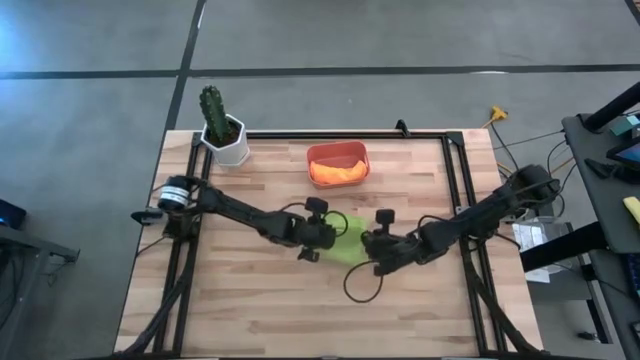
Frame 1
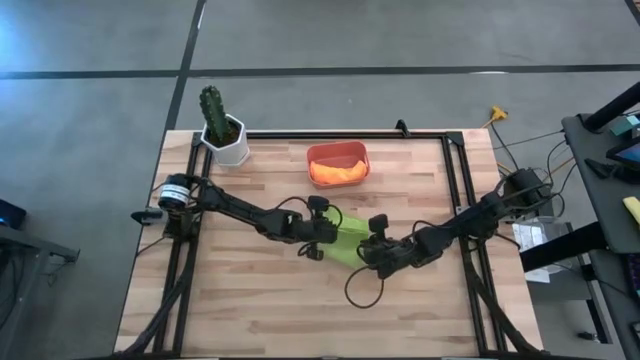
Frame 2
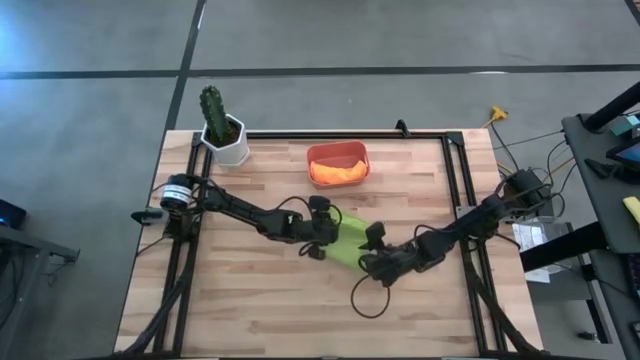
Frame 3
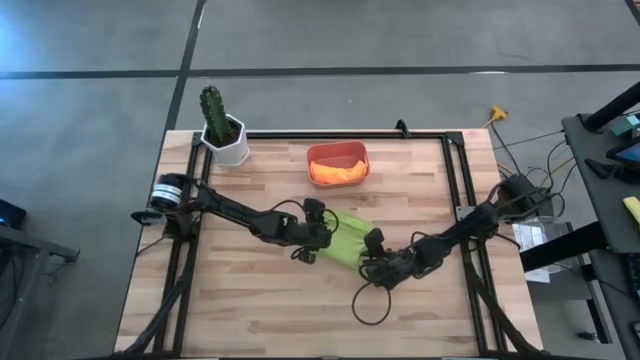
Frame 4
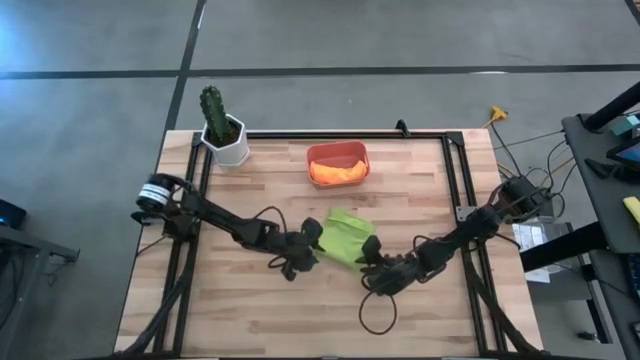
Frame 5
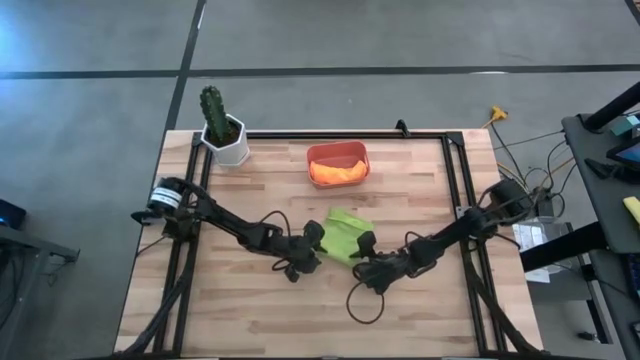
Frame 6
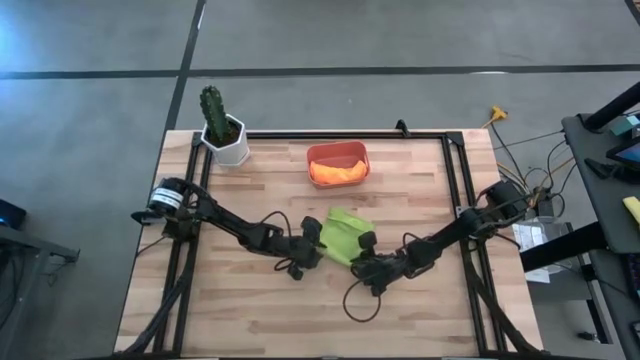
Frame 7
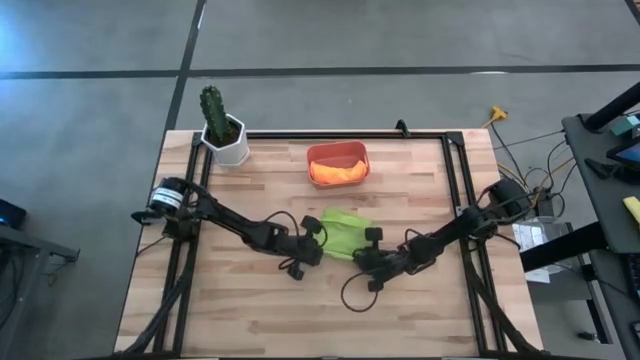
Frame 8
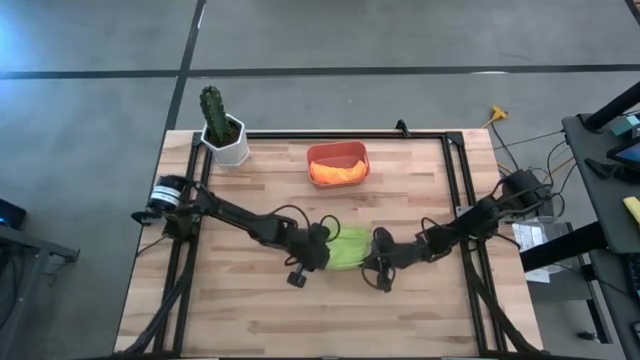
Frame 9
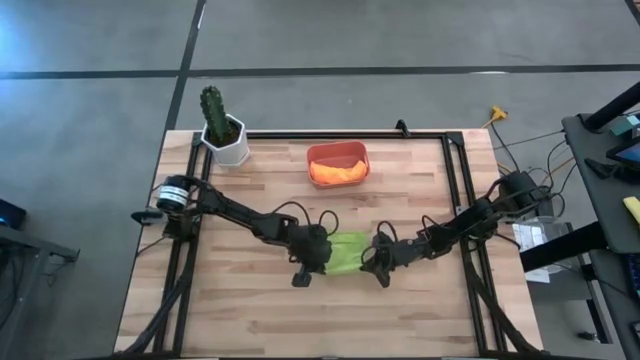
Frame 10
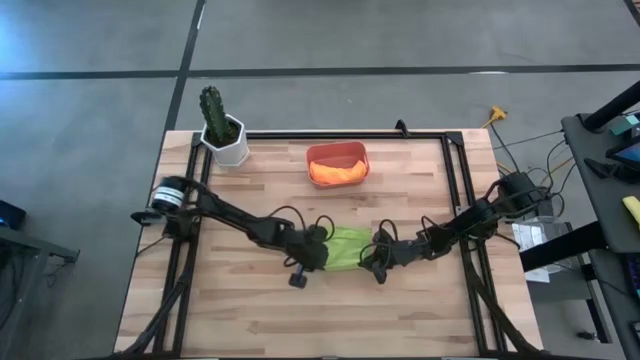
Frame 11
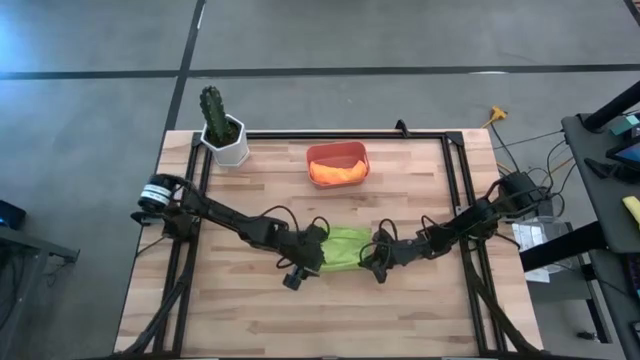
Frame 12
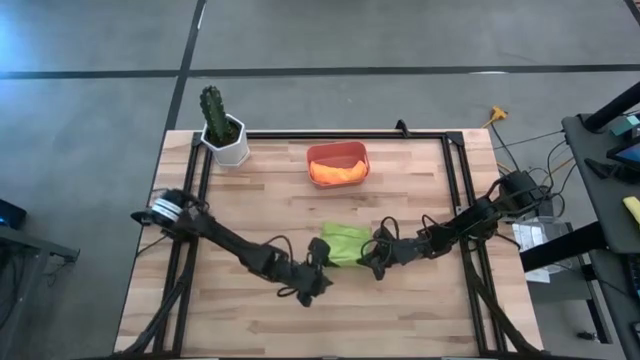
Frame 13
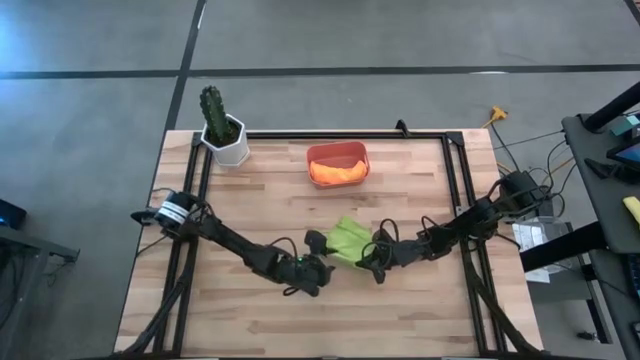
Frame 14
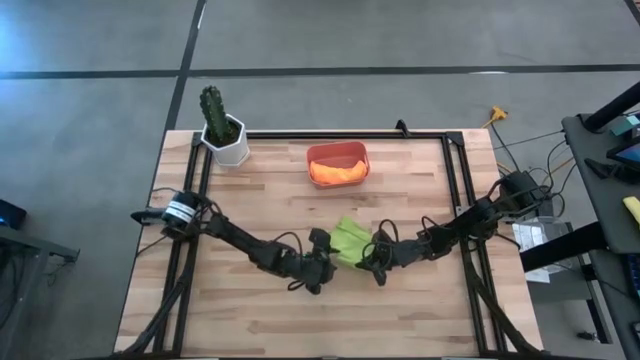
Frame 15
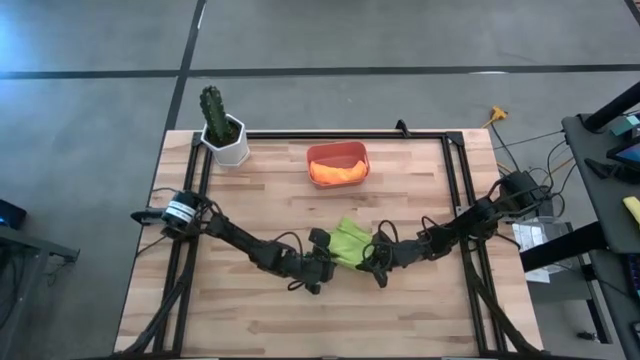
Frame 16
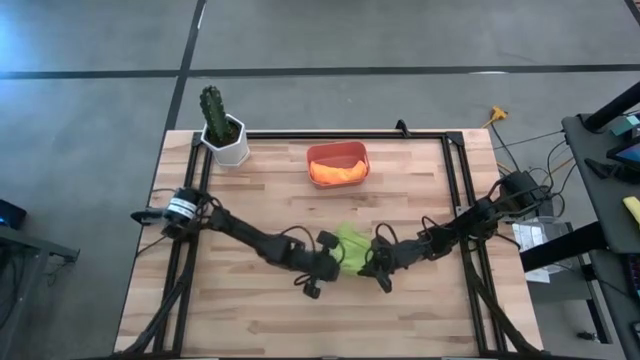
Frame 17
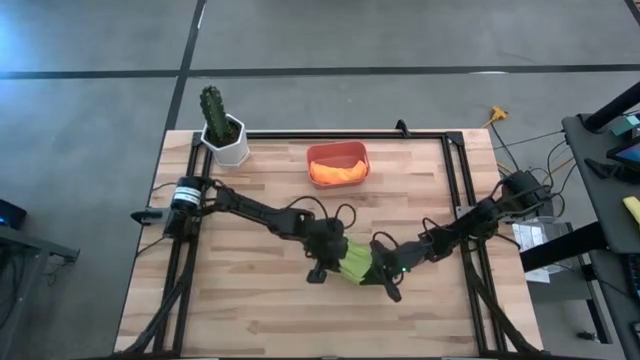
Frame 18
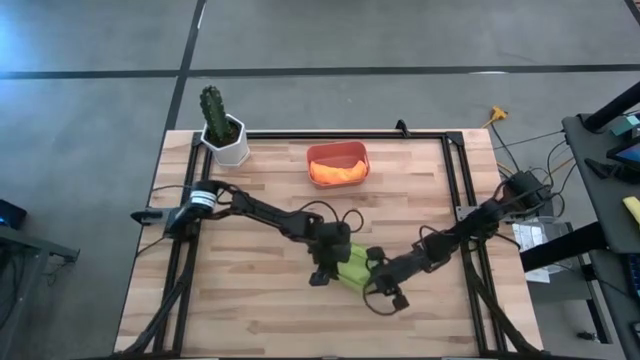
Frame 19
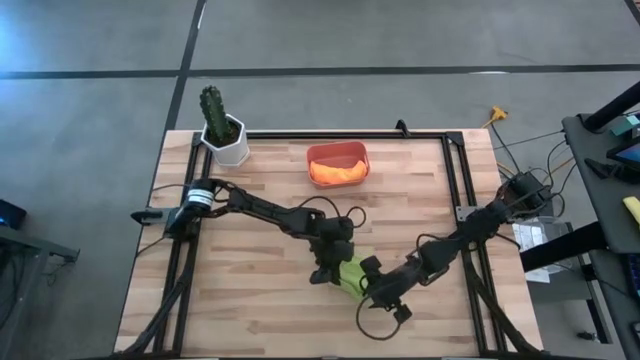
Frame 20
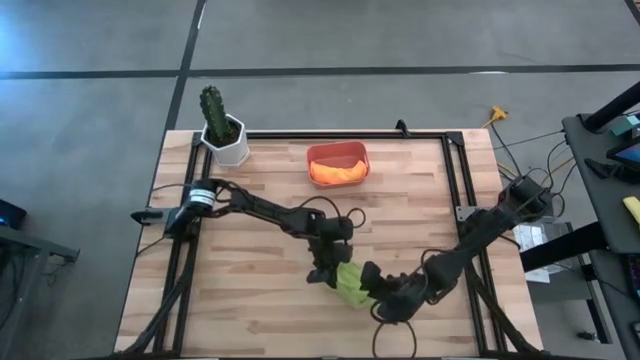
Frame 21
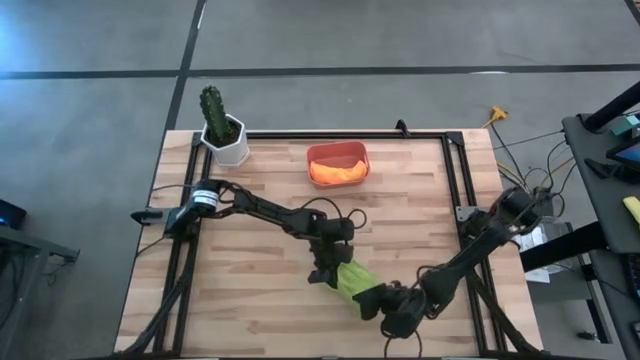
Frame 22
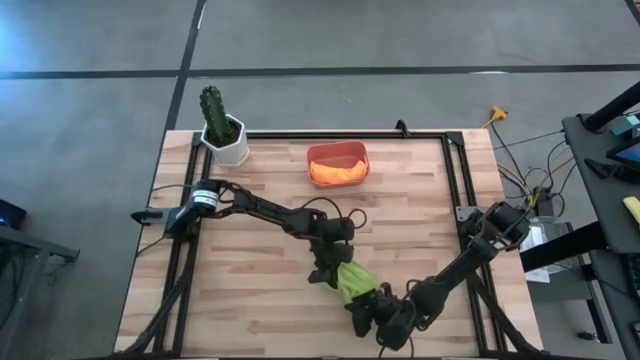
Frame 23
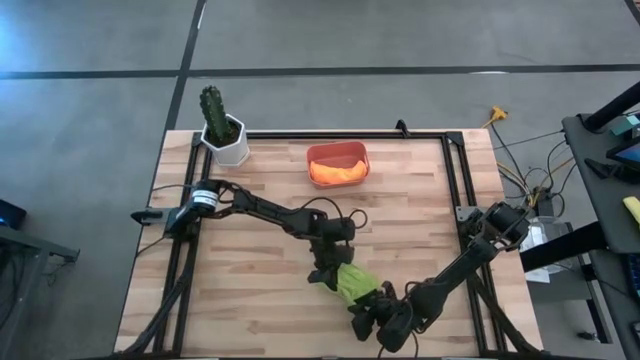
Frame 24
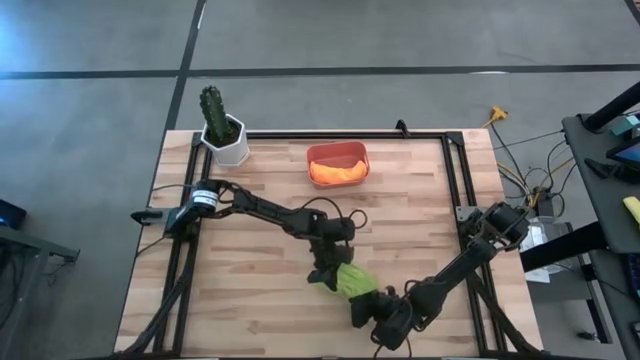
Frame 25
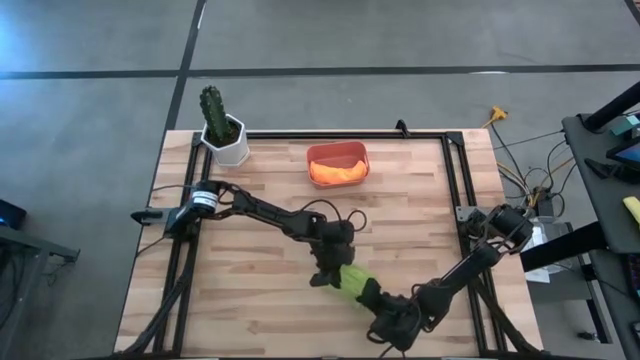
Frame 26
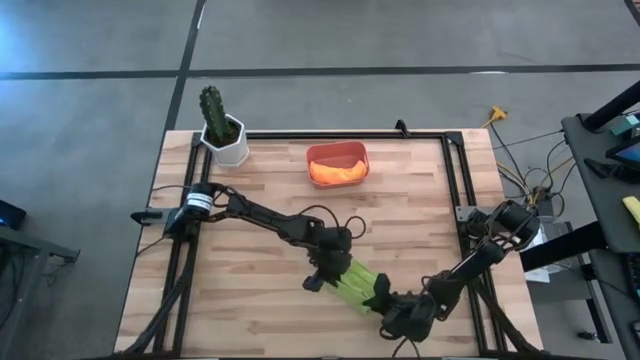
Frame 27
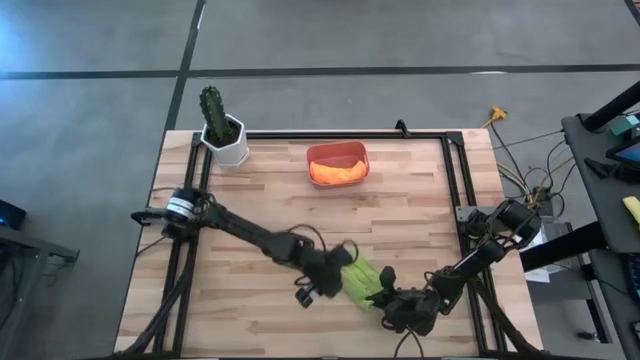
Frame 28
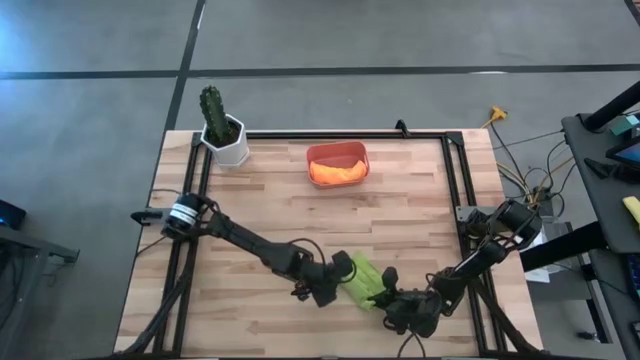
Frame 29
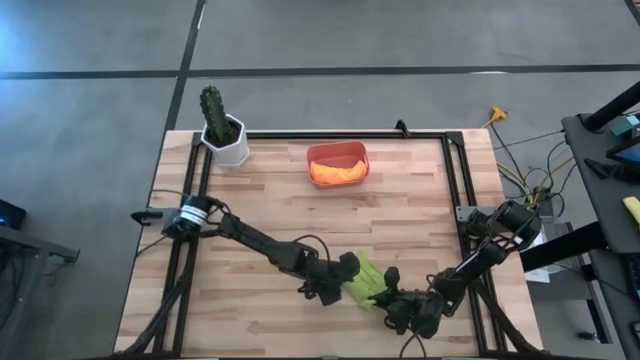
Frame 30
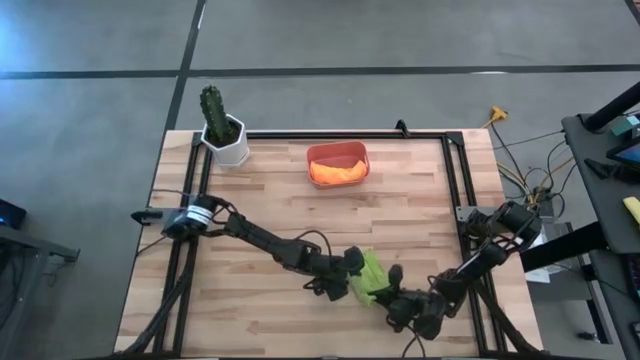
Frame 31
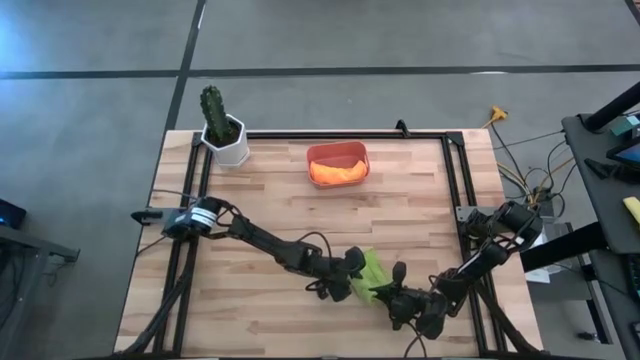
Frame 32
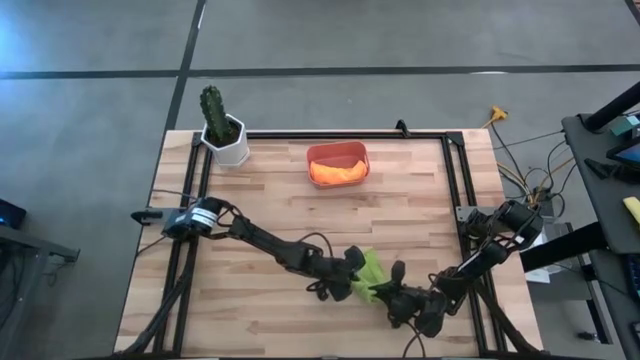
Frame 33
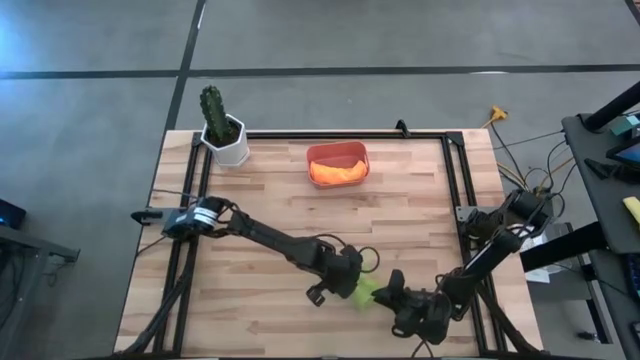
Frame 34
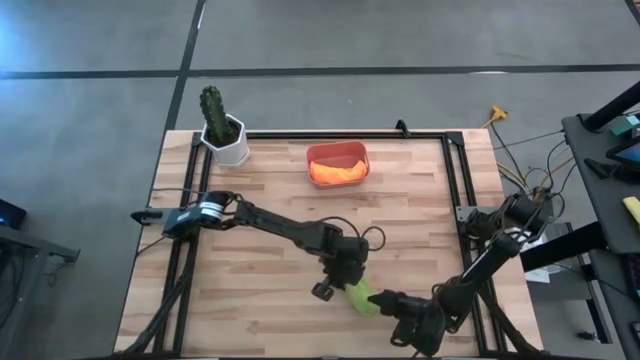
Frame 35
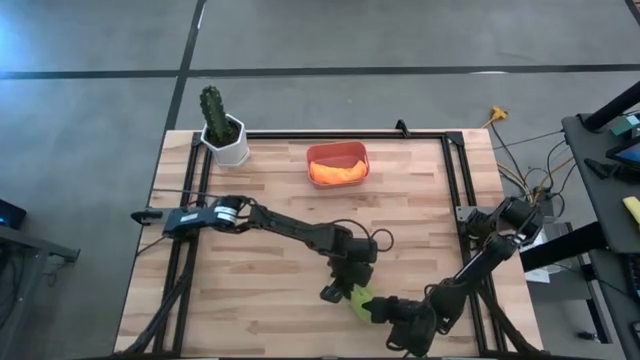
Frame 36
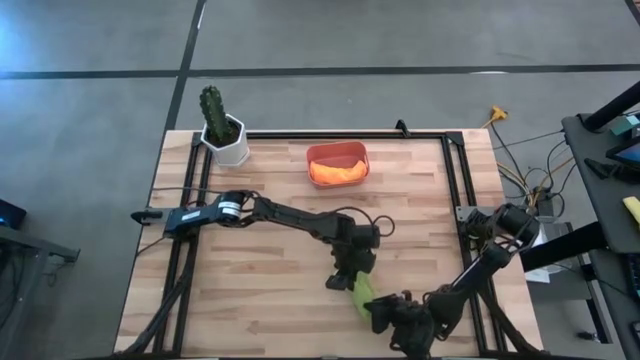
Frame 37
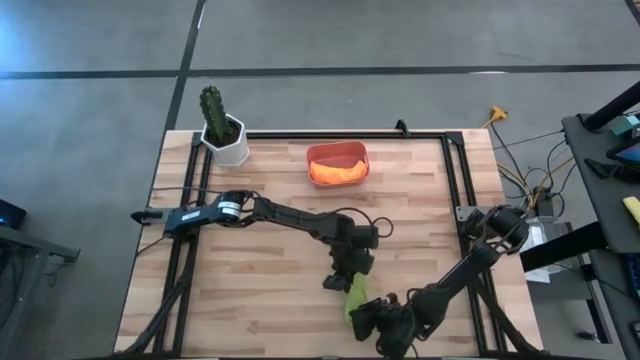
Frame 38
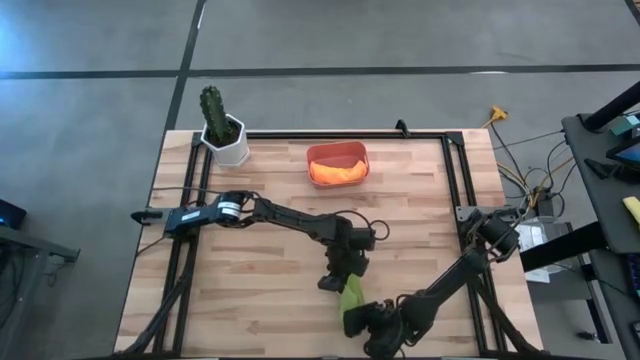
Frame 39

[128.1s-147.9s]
Task: Roll microfiber towels into tight, uniform cylinder then place into a basket
Roll the green microfiber cloth

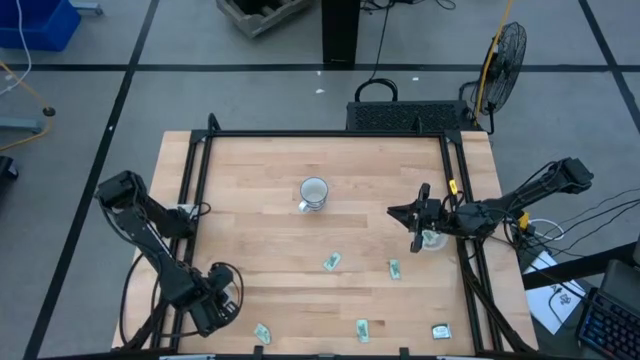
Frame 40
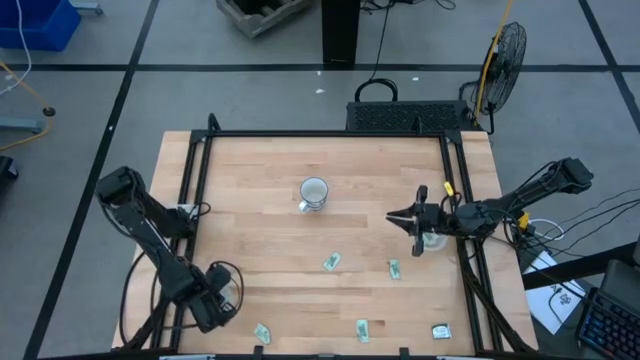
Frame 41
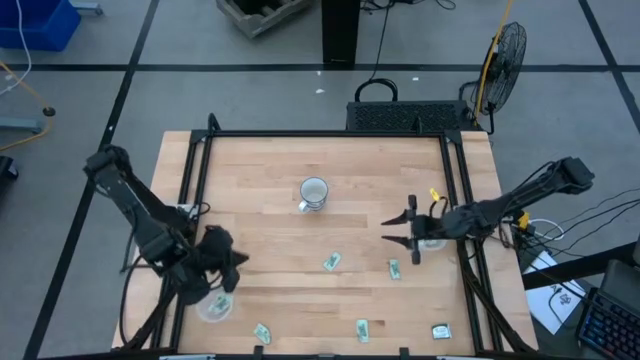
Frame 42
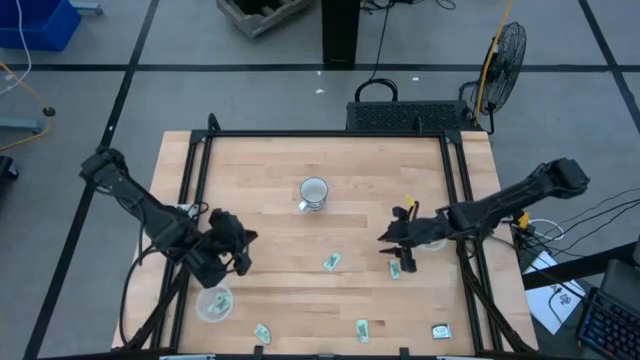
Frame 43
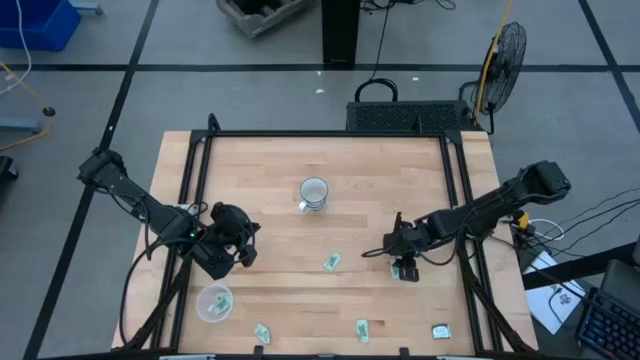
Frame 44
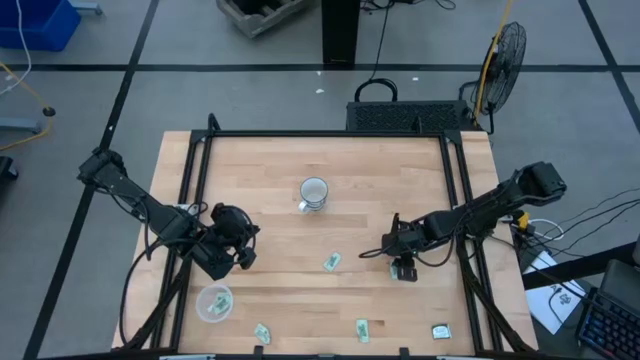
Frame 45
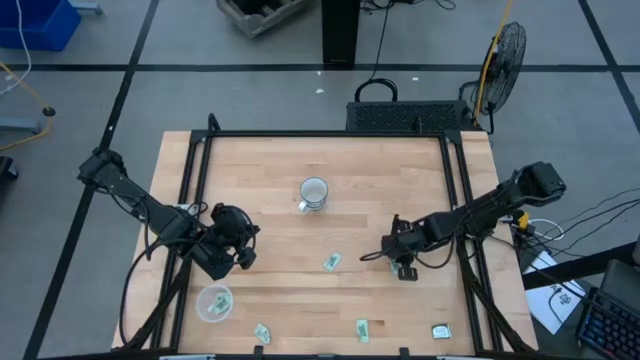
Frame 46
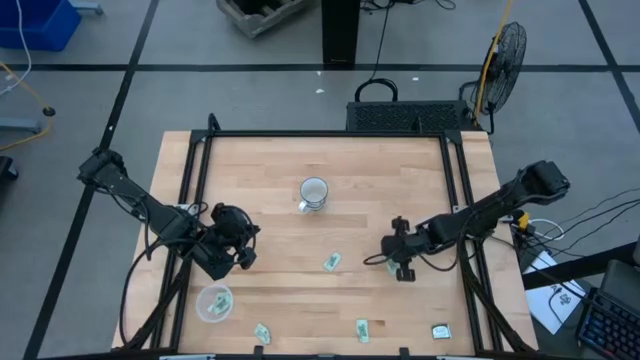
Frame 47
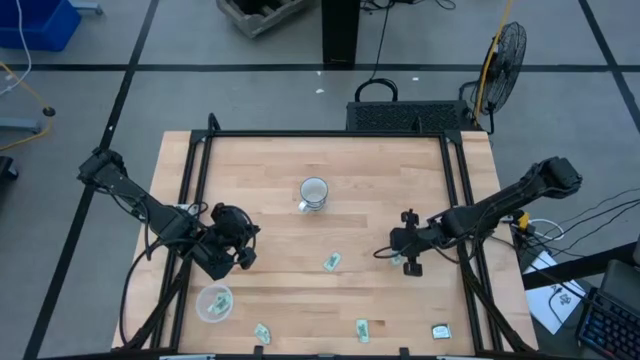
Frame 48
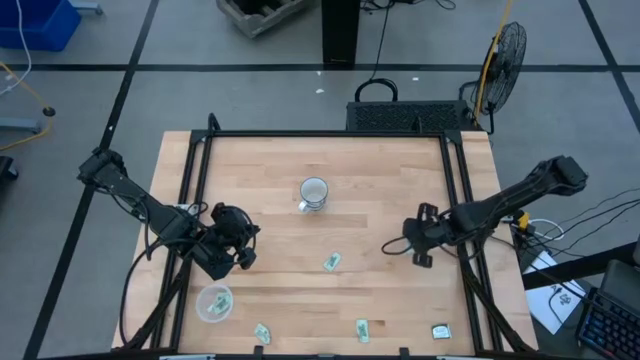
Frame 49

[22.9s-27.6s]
Task: Pick and place Stevia / Truvia into bins
Put the green stevia packet into the right transparent container
